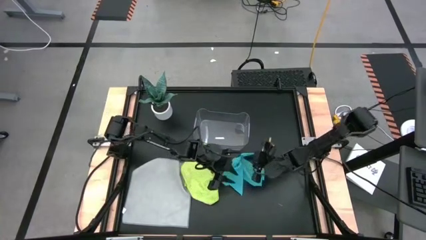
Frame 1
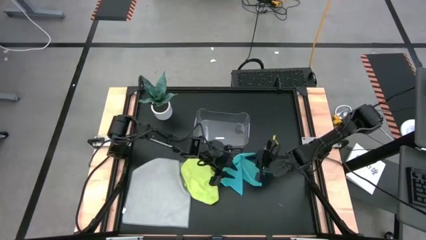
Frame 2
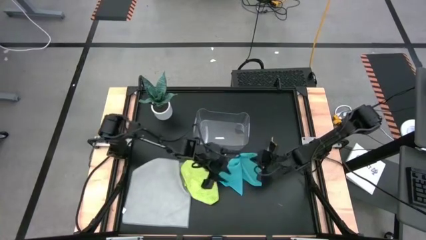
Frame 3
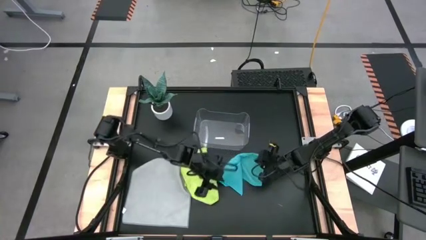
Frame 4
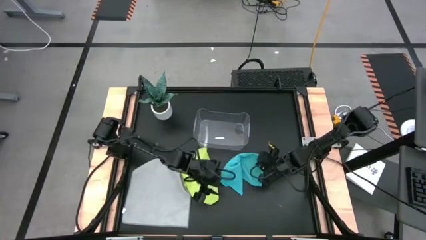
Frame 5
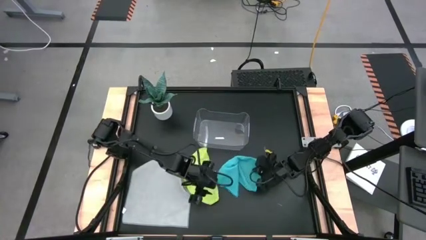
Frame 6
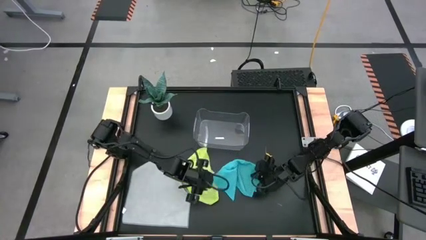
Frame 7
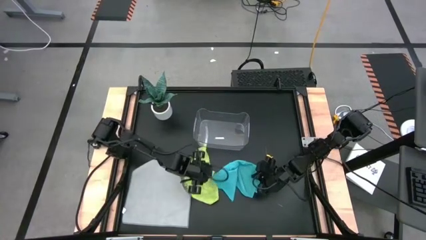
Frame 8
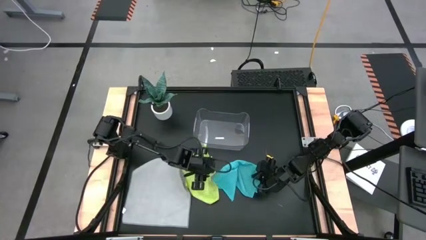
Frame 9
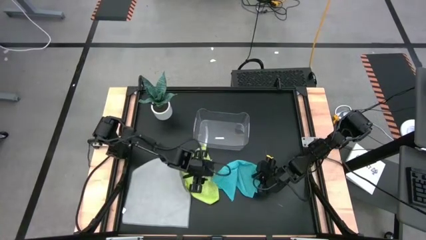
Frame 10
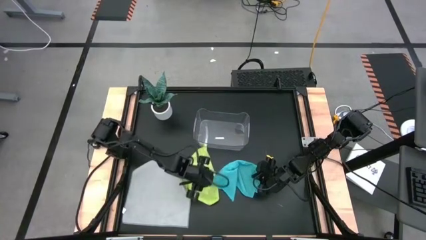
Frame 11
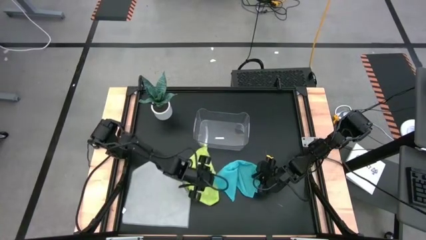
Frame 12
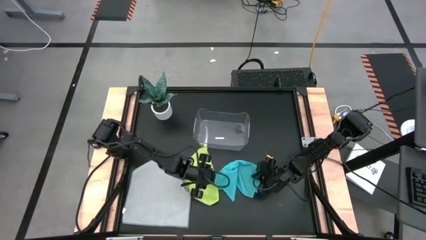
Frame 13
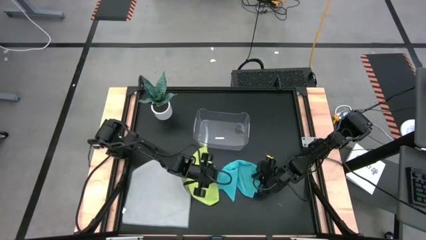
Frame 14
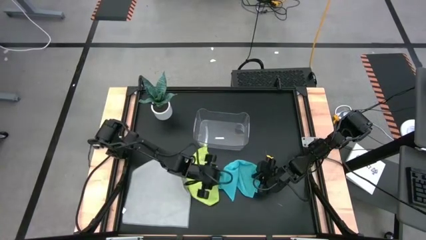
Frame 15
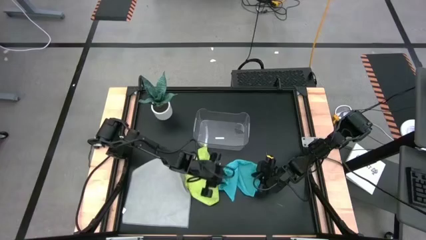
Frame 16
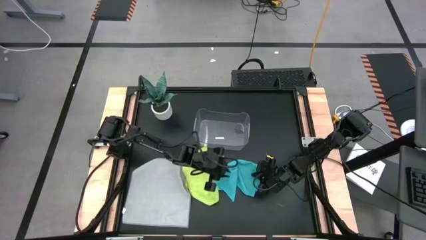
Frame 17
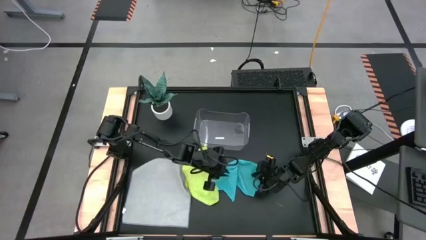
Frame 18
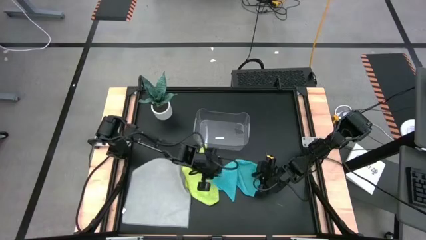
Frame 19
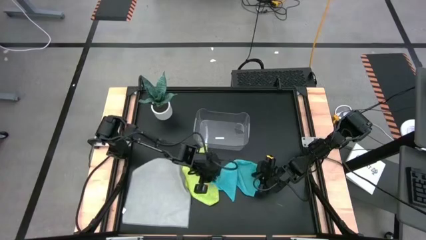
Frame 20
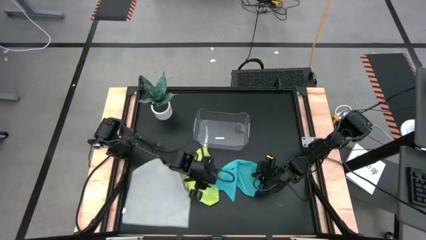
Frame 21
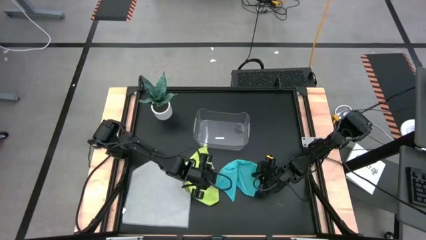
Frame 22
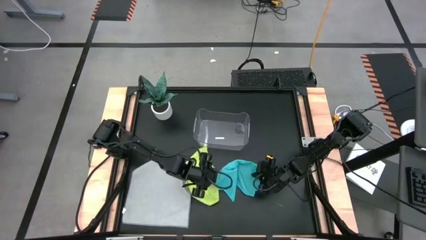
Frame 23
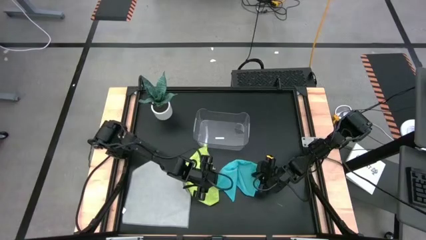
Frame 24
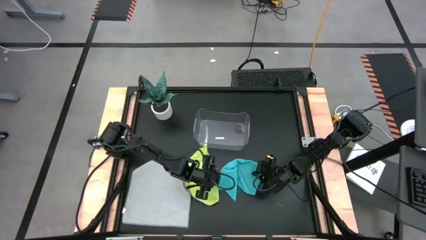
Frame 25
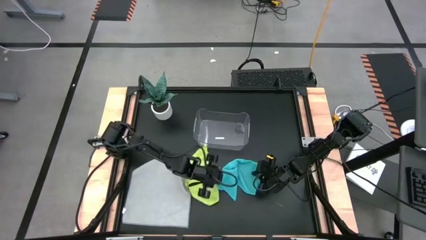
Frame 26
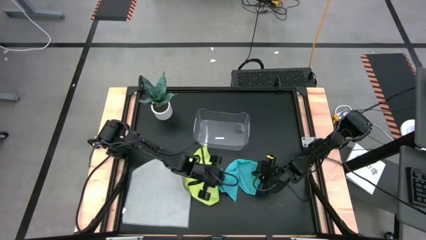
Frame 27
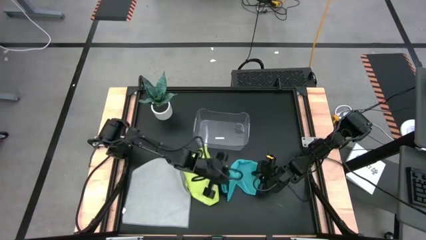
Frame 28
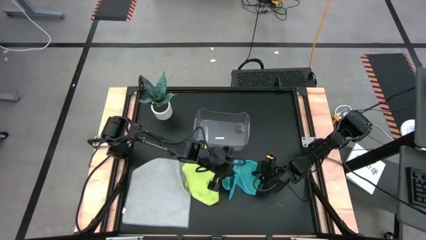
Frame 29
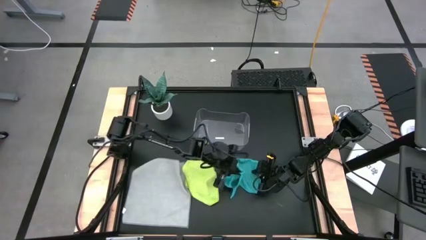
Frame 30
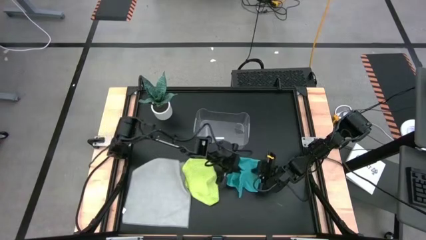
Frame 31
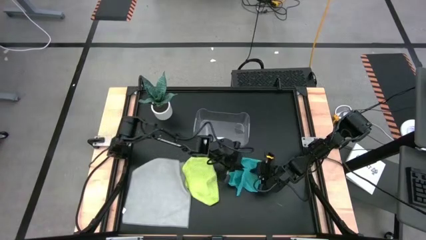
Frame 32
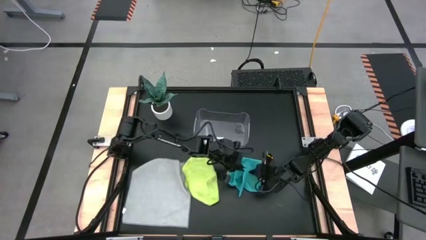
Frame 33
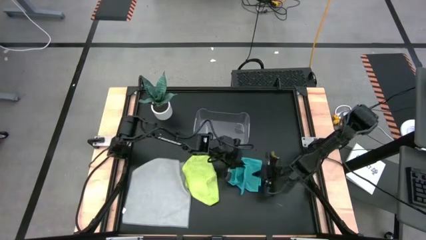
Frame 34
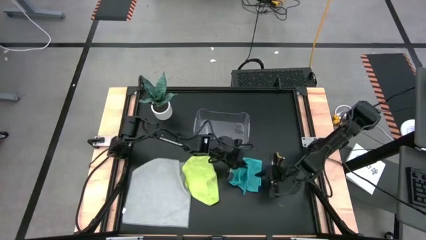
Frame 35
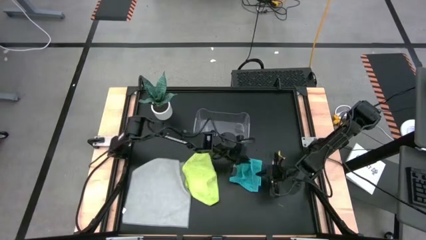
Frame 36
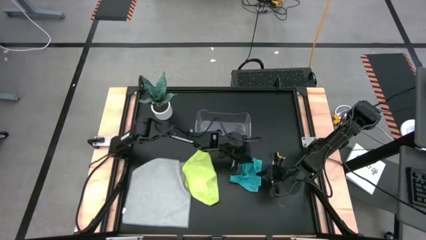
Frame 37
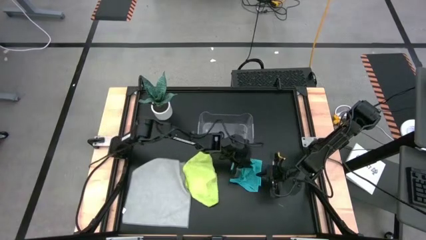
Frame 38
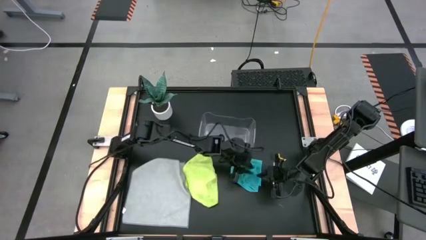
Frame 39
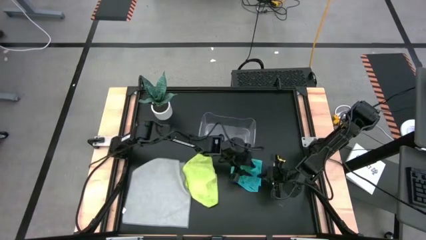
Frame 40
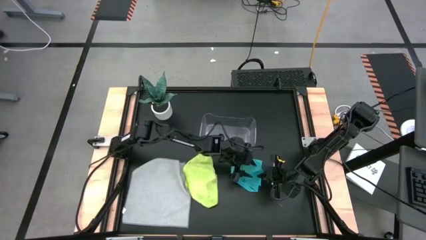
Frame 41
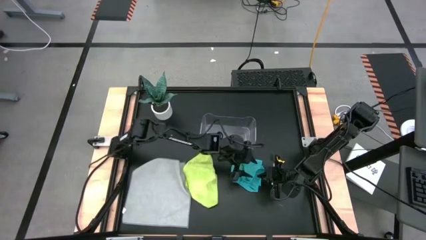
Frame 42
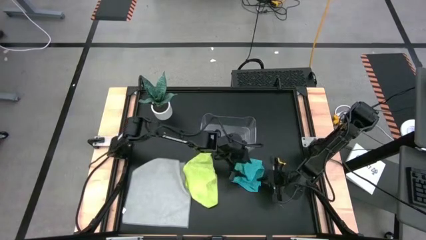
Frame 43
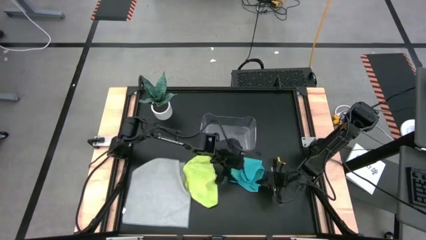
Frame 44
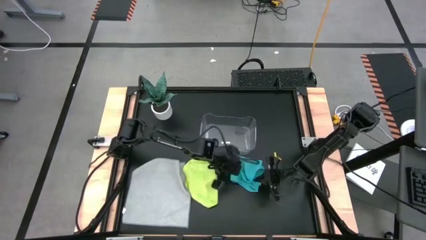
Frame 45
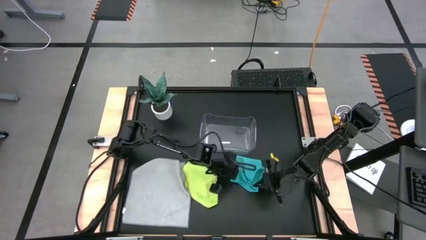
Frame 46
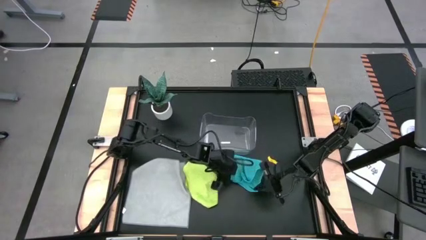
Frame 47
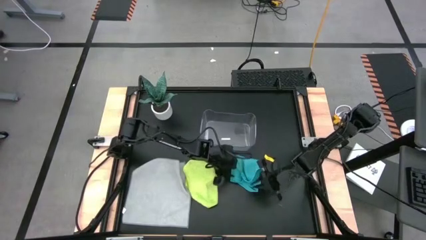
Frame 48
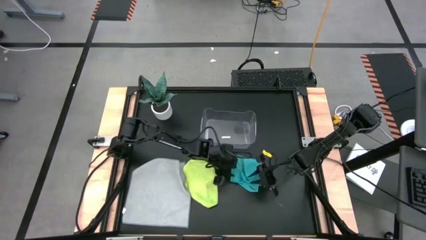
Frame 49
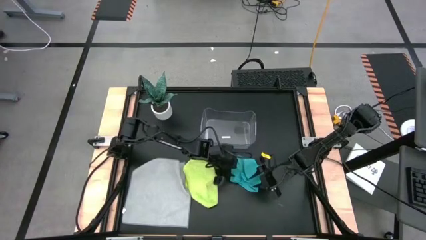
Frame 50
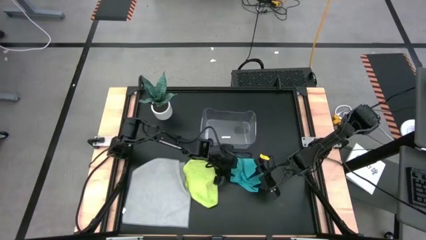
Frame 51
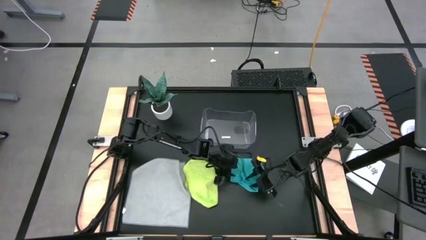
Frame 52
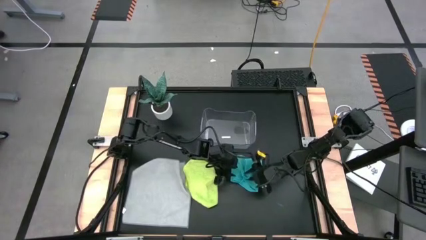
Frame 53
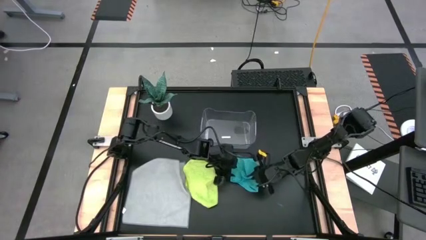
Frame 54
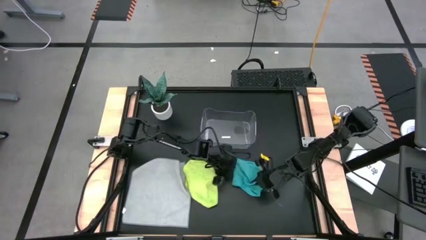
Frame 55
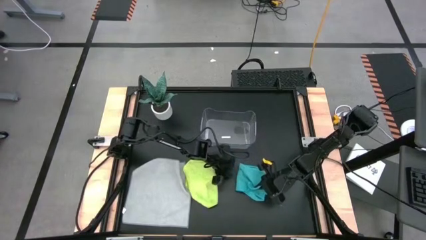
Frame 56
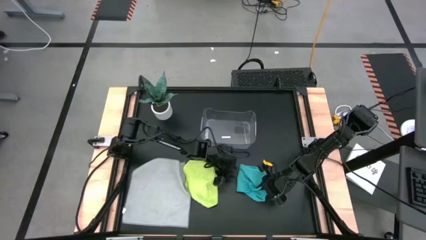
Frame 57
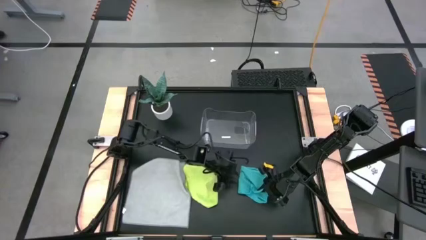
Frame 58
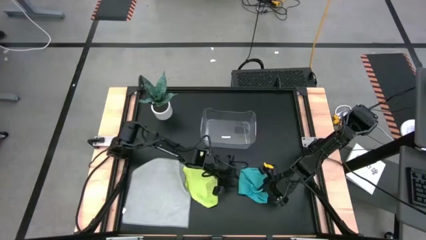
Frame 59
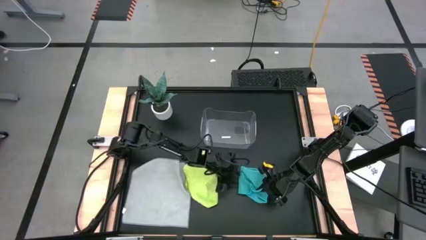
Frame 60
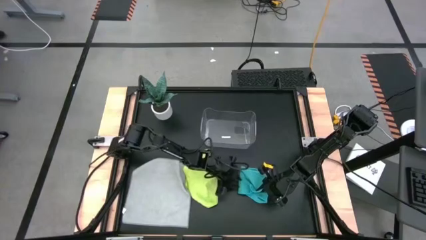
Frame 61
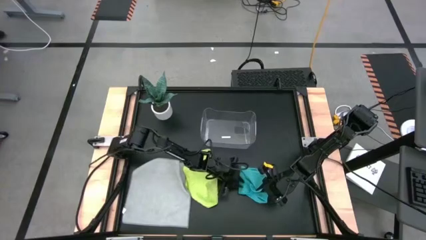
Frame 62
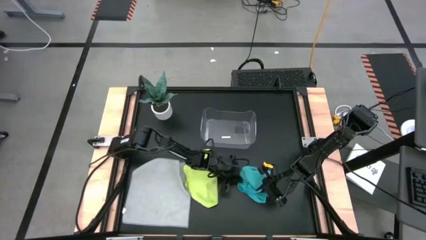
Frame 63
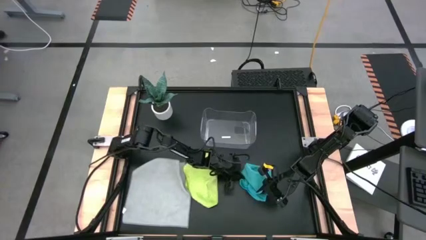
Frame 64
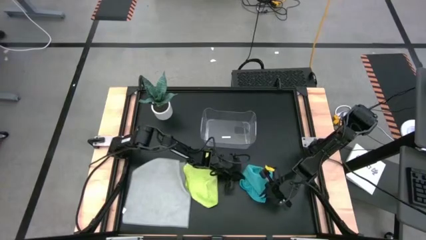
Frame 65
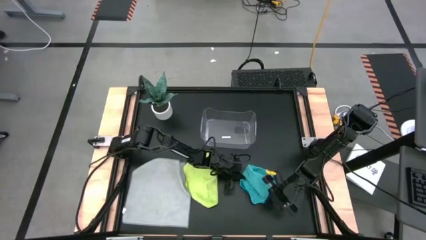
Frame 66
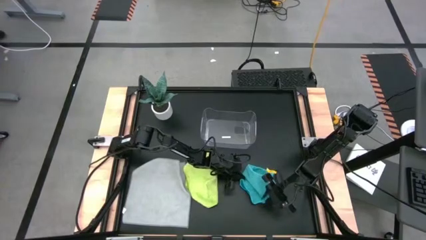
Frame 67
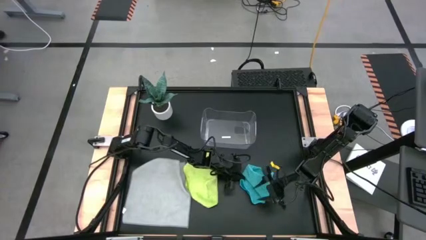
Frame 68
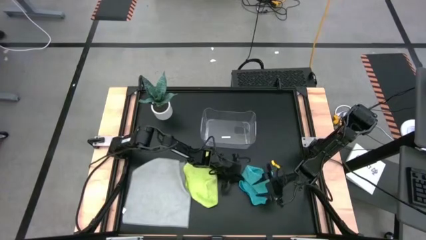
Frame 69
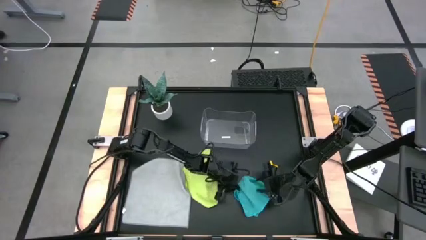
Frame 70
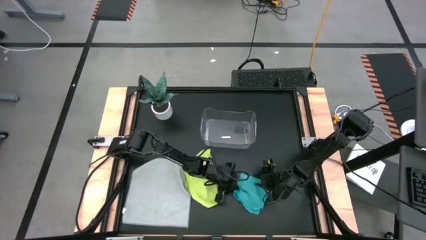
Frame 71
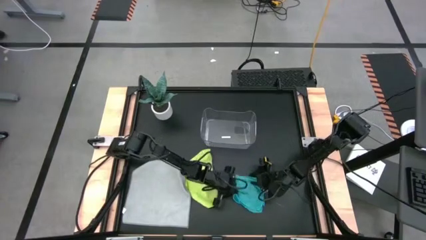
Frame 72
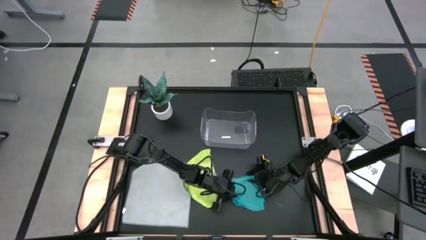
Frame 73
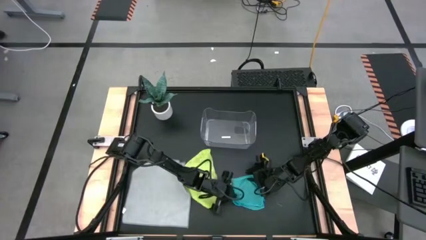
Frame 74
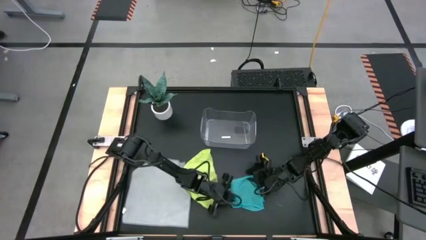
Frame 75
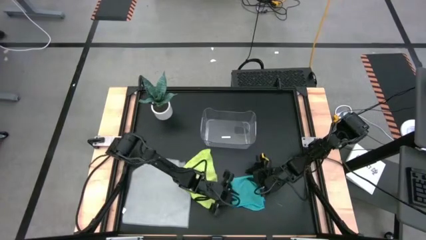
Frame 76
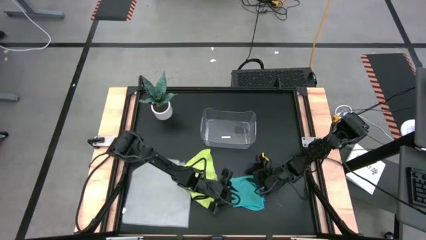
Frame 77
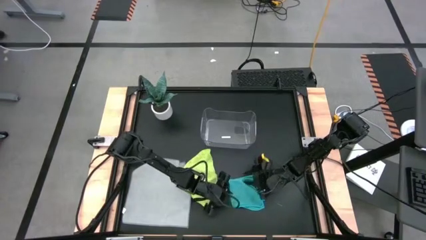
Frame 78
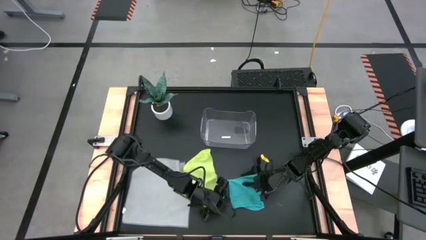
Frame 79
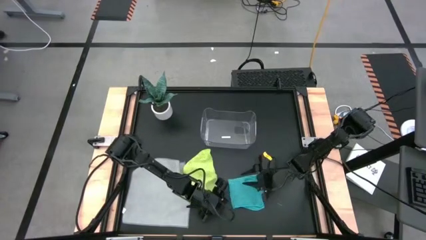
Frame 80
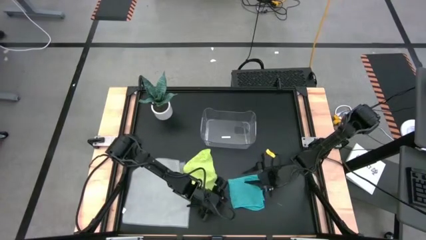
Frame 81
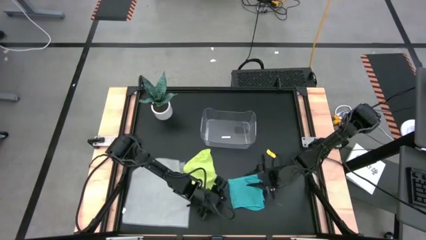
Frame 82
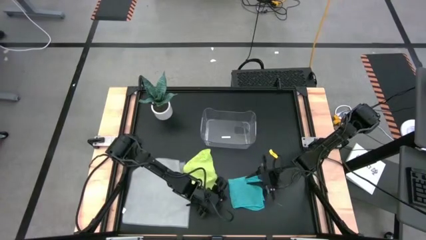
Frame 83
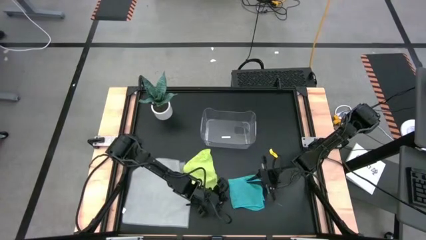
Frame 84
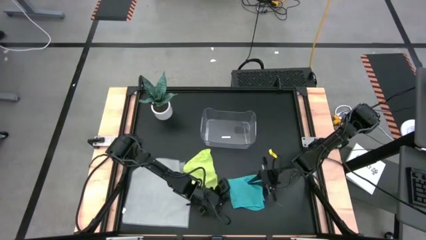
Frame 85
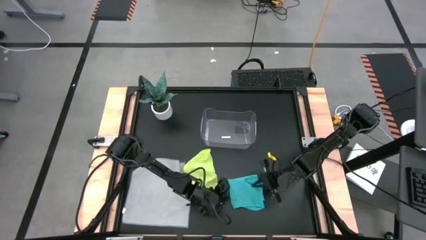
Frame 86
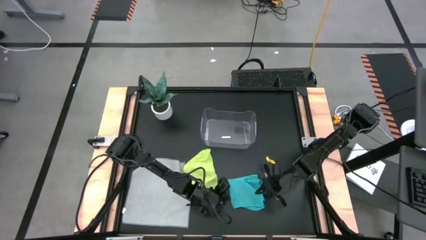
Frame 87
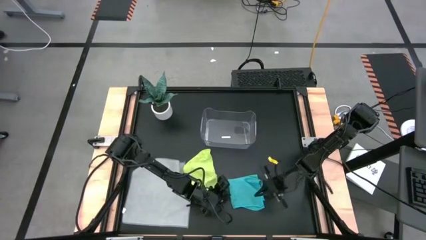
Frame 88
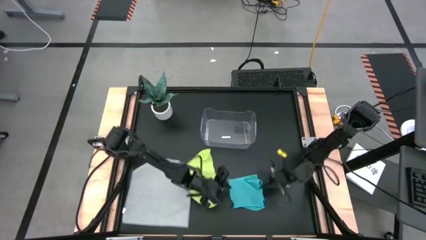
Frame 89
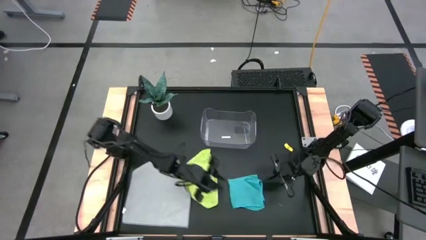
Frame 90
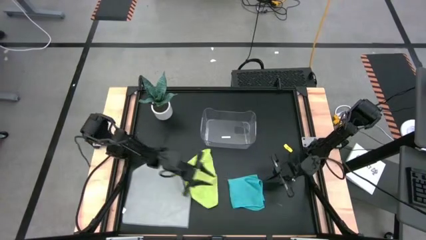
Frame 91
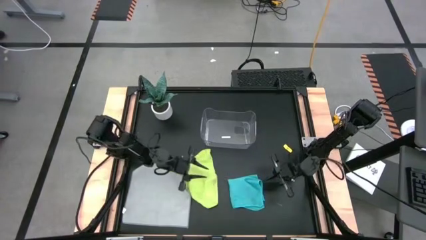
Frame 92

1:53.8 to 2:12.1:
Task: Fold microfiber towels
Fold the blue towel
